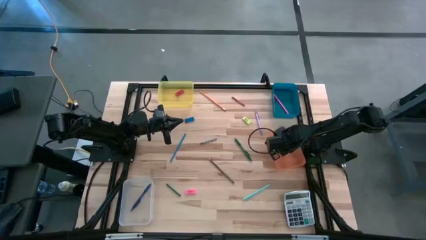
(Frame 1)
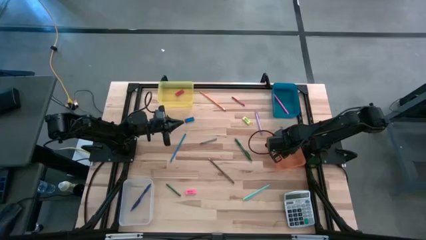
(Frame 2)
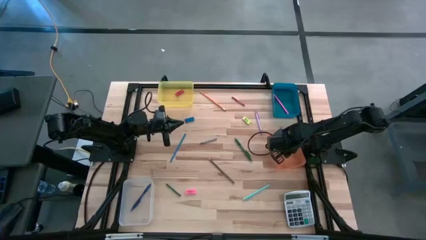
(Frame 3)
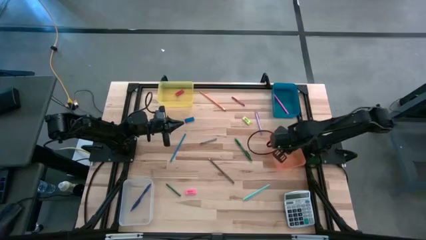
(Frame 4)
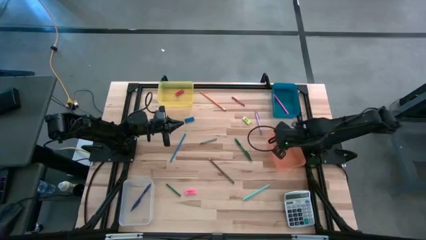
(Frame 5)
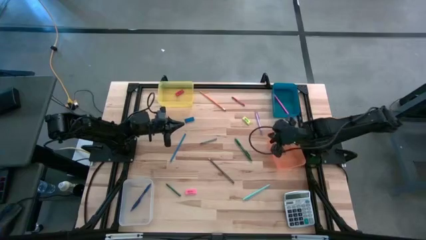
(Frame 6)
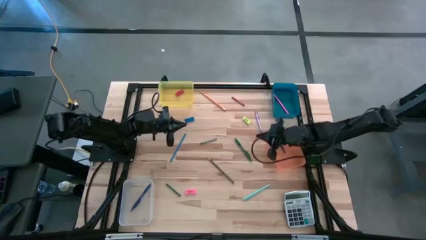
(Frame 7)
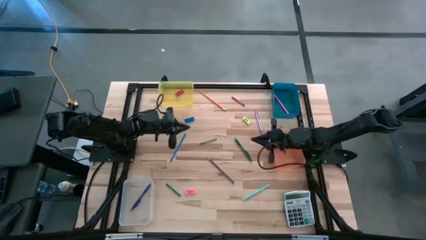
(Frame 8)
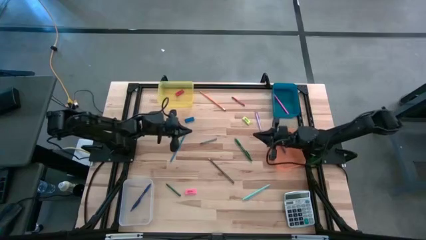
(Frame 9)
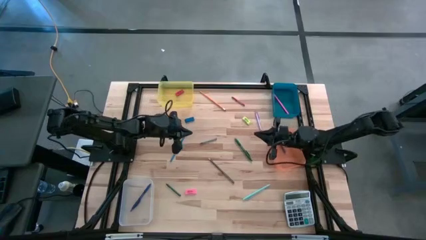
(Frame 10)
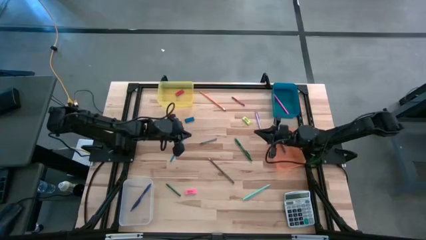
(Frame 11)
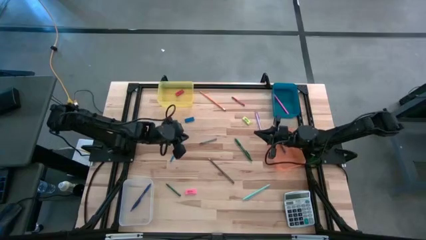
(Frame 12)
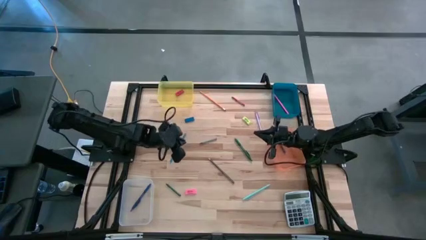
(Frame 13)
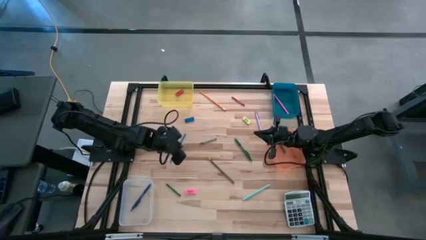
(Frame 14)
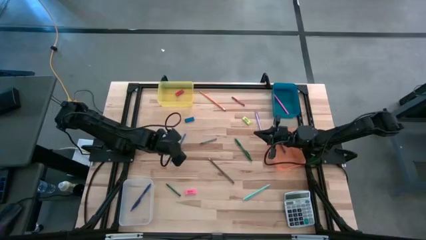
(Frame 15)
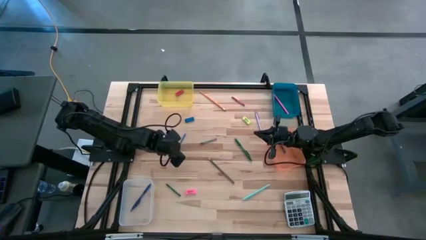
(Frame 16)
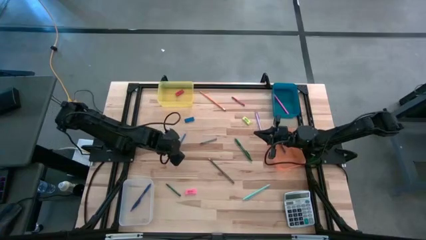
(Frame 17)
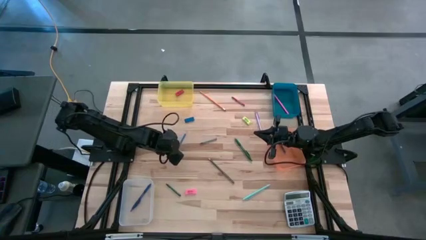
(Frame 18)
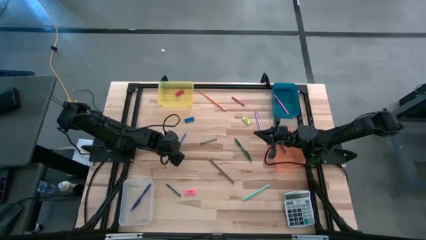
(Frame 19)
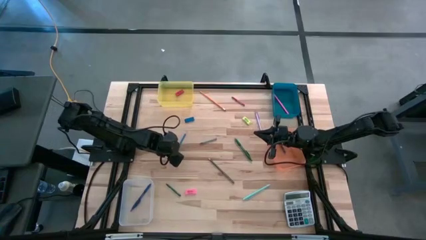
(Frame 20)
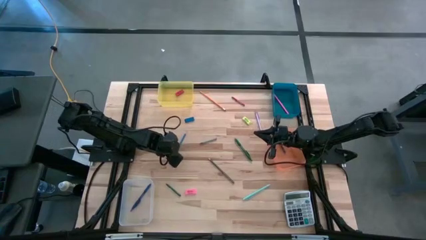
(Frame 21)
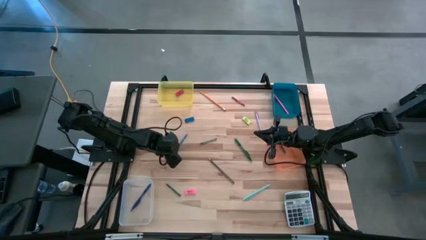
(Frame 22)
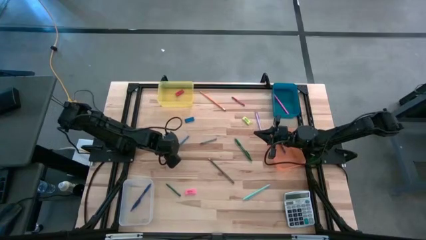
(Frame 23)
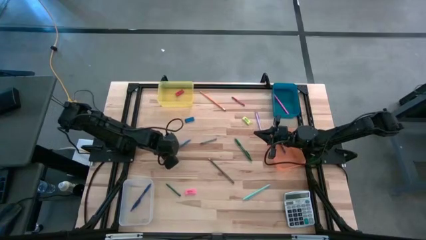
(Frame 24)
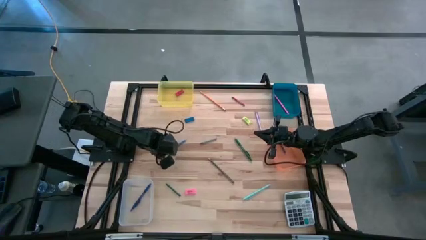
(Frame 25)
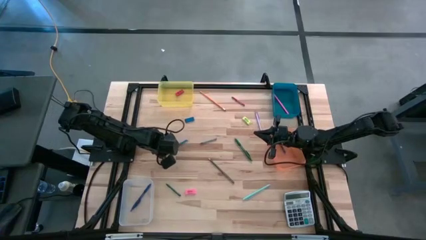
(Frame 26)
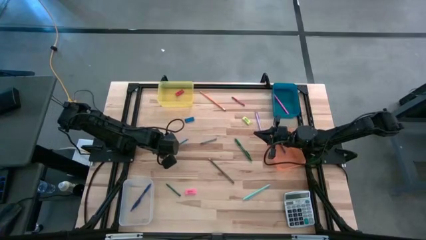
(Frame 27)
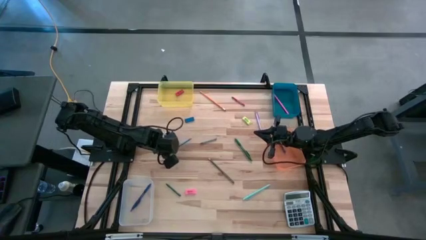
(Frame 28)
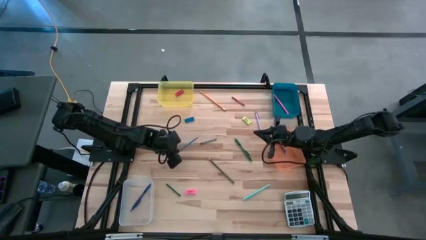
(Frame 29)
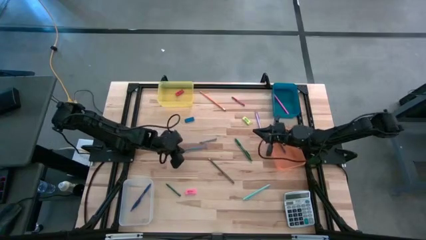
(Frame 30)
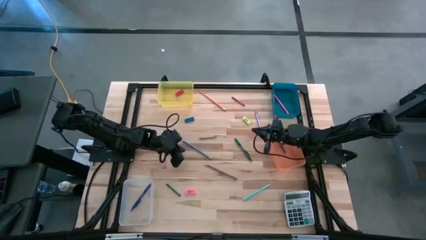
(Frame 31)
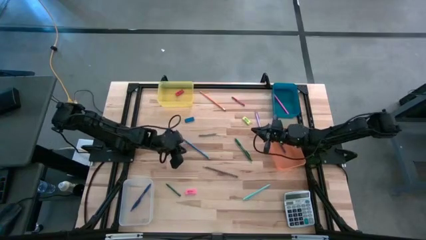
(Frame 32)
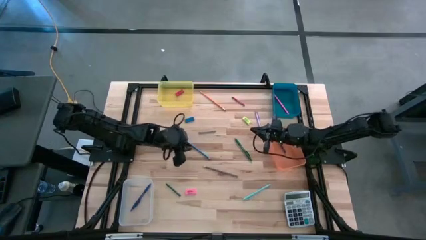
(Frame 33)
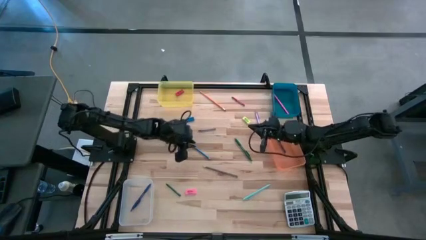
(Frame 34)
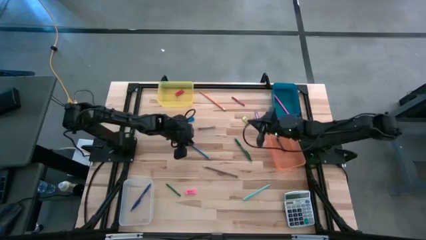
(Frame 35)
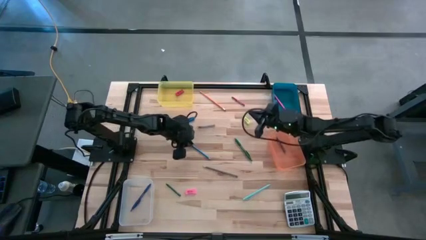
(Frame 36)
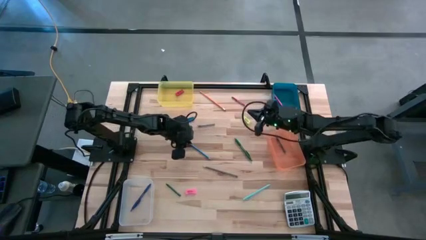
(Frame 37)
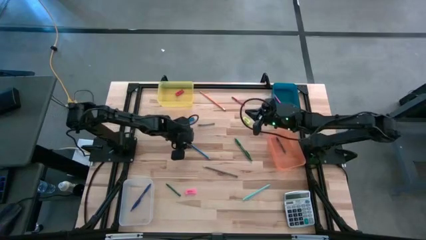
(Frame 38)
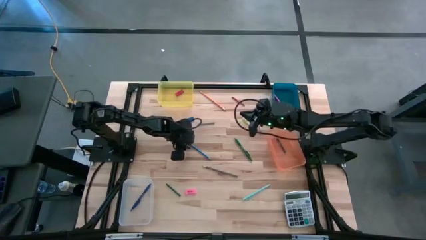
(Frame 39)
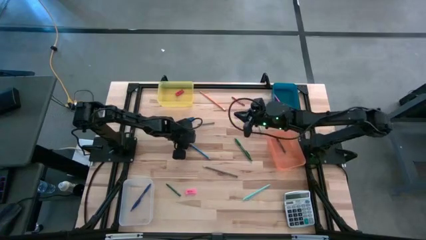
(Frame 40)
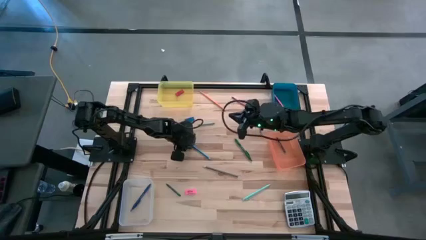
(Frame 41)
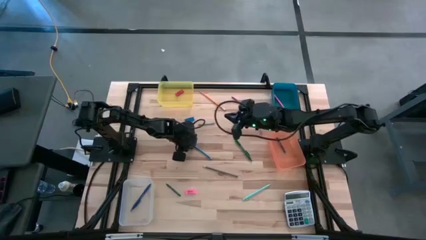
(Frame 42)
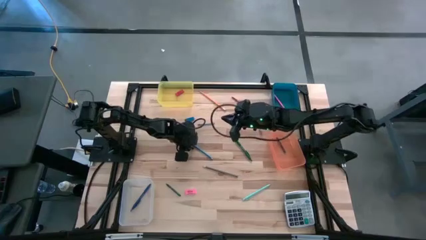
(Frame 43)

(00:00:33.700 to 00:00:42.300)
Task: Sort crayons/erasers/pens/pencils in bins
Put the blue pencil into the blue bin

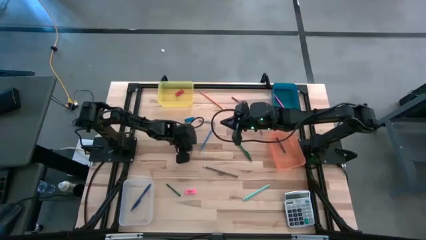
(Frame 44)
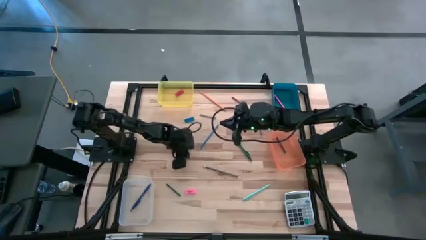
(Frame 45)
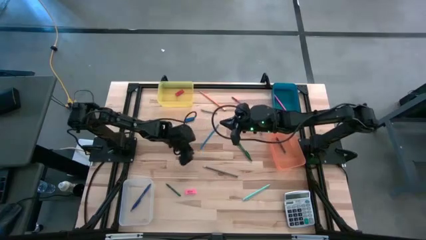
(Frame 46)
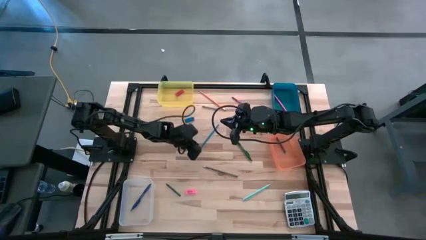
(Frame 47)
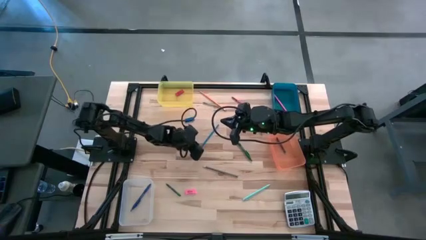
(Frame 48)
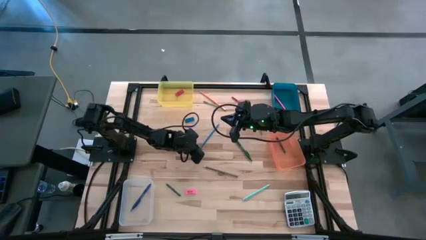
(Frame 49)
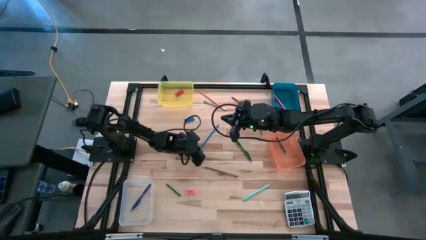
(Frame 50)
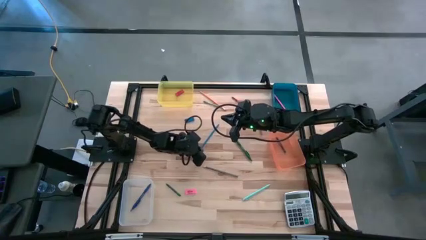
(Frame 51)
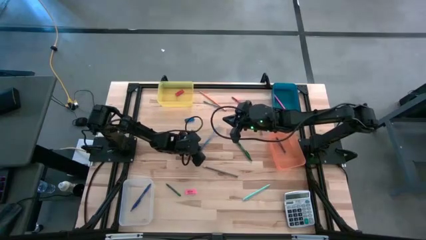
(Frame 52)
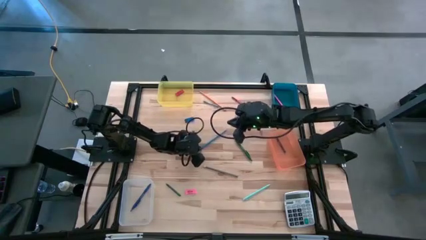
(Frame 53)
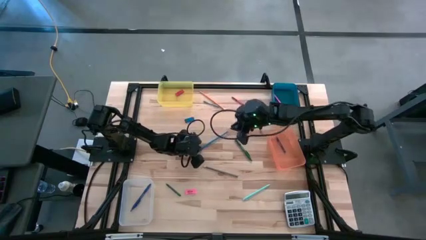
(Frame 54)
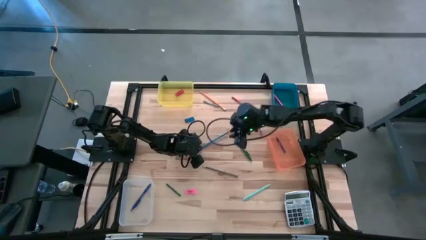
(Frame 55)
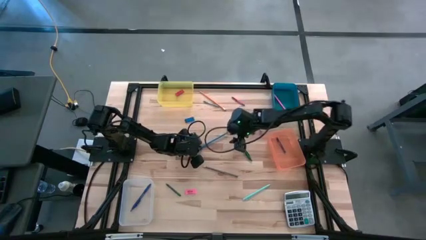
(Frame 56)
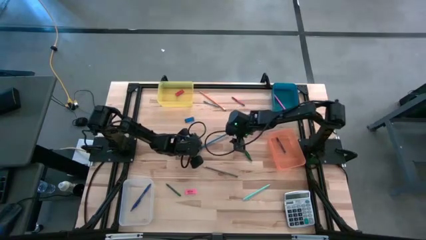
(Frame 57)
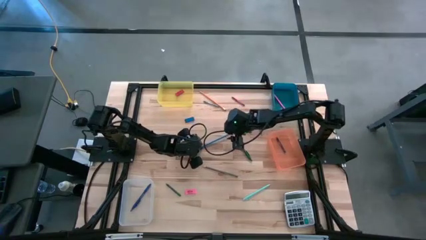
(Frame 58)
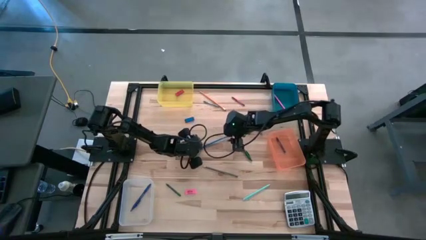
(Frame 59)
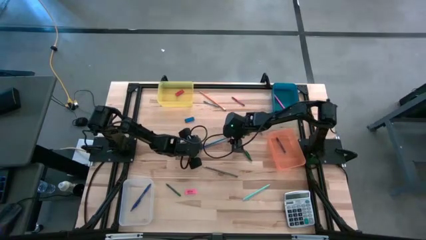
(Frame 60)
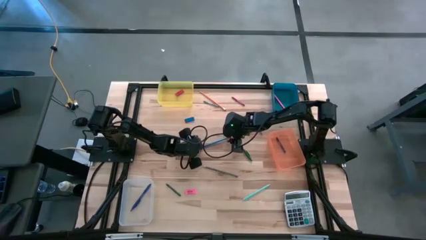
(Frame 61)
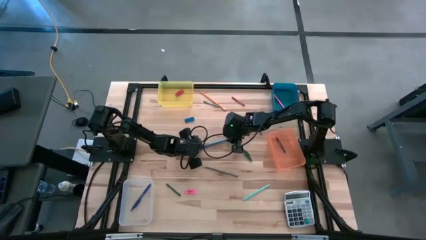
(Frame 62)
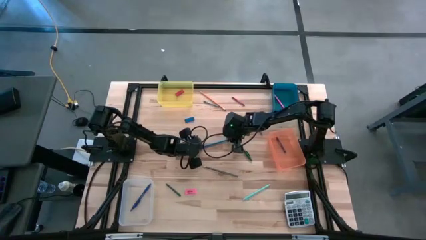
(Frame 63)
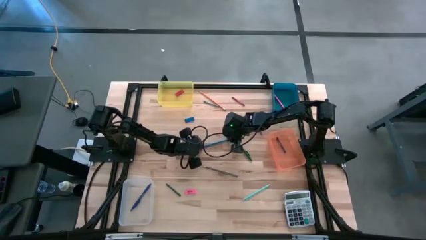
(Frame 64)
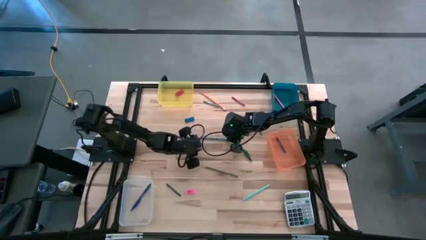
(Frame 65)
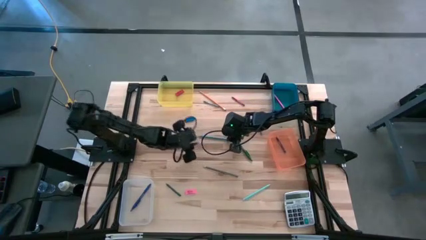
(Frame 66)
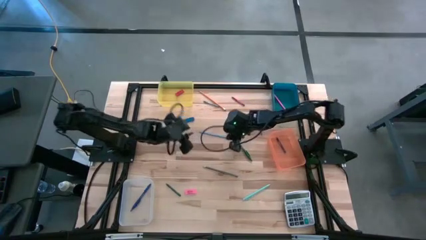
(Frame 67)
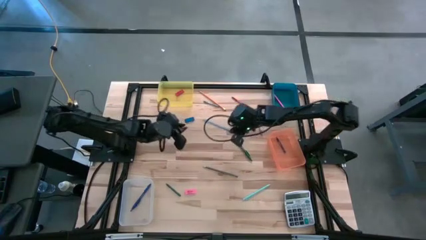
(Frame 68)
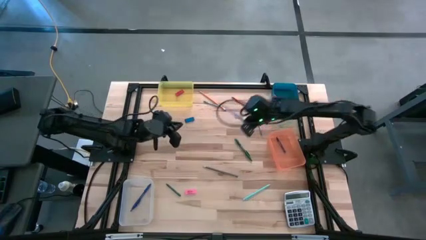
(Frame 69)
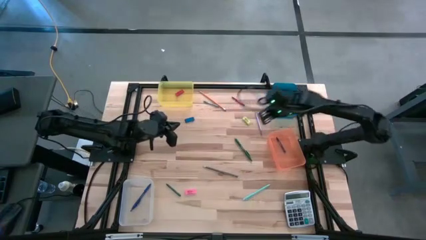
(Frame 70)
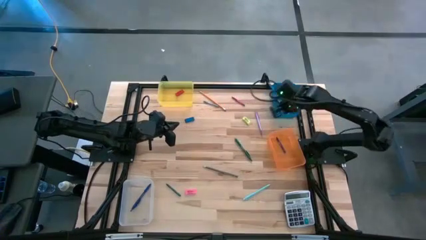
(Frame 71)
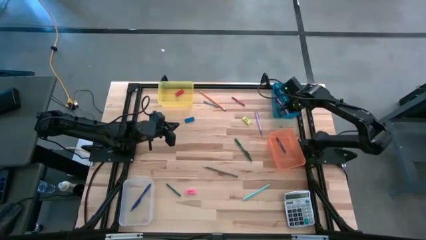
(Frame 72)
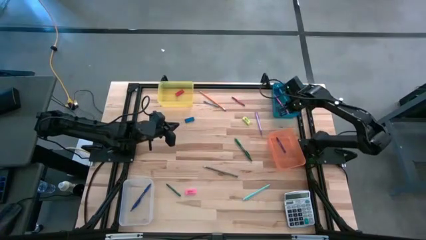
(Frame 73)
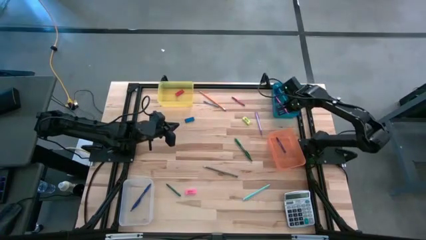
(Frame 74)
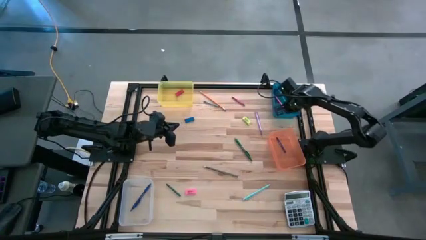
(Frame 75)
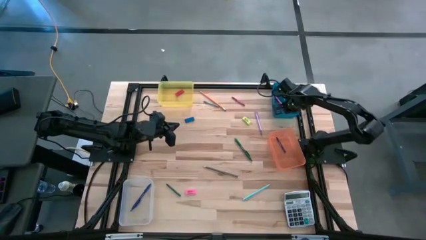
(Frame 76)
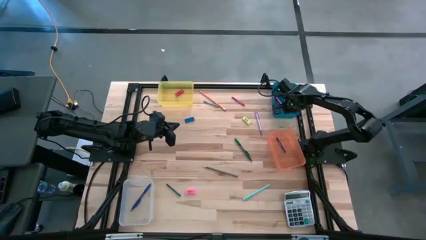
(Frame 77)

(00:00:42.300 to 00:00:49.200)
Put the blue pencil into the blue bin

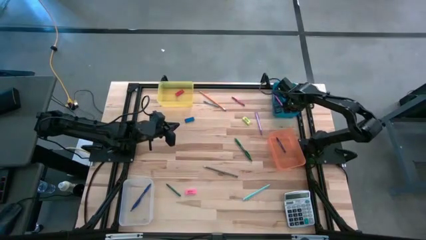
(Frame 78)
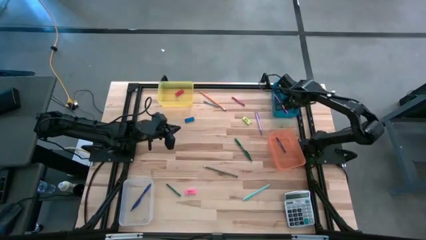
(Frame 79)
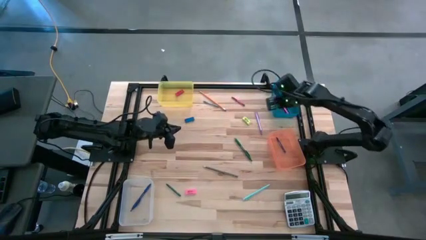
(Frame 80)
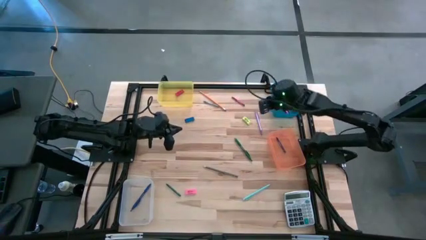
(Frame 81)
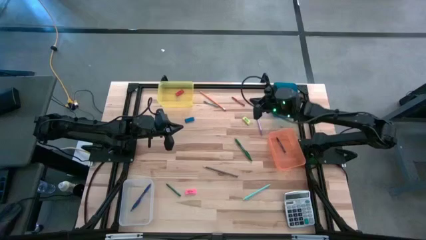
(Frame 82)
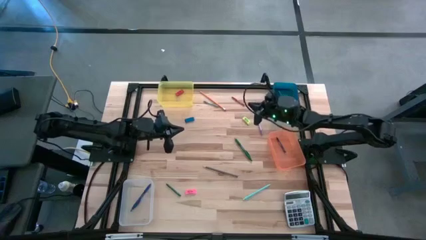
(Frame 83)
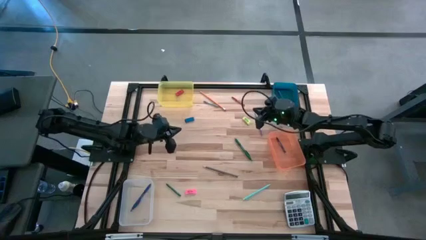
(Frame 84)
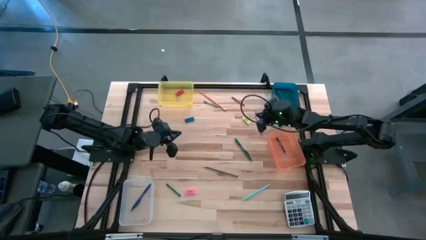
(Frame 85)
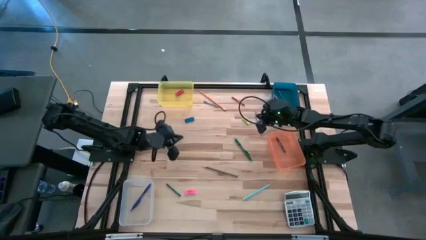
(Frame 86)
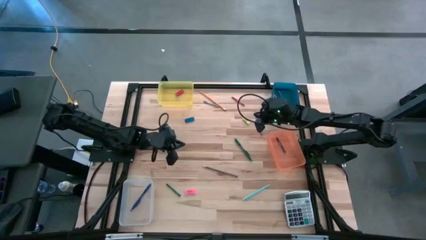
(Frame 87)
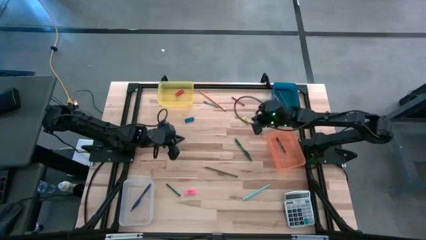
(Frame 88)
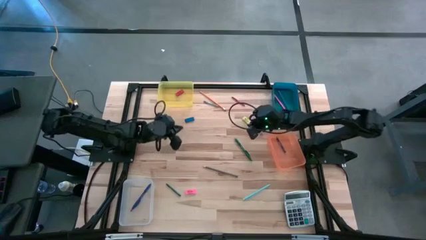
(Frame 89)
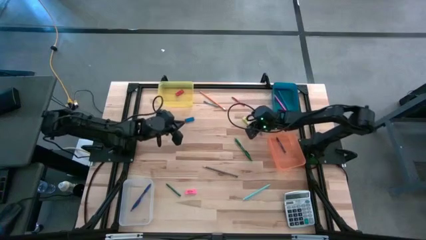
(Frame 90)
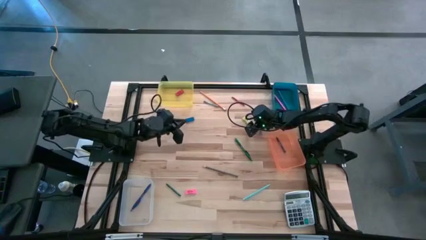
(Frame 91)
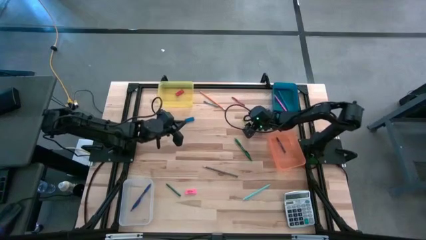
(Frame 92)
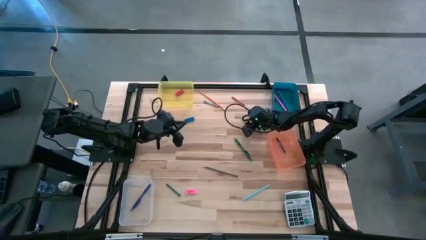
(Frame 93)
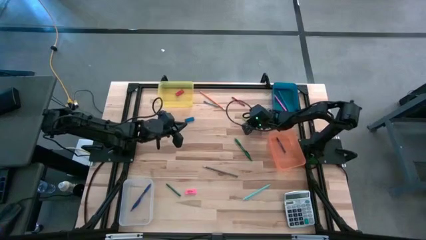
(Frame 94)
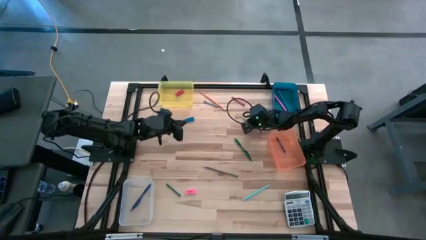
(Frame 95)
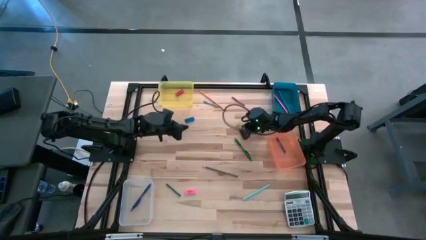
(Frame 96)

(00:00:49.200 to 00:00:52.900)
Put the green eraser into the yellow bin
